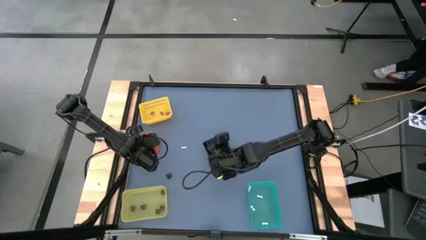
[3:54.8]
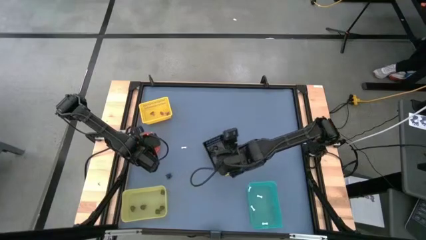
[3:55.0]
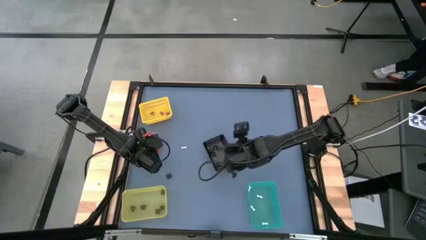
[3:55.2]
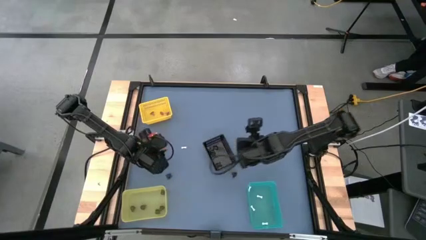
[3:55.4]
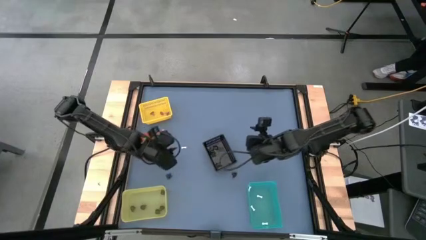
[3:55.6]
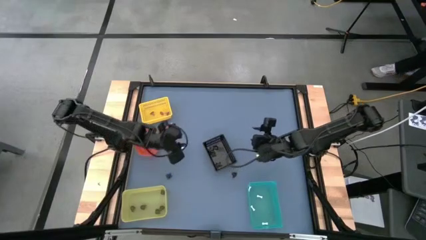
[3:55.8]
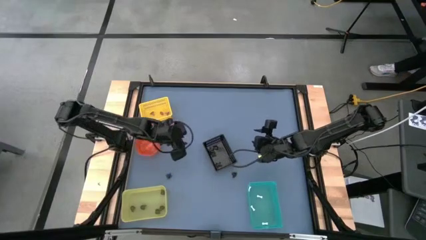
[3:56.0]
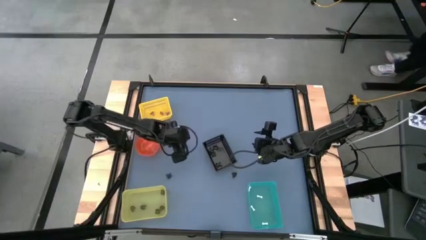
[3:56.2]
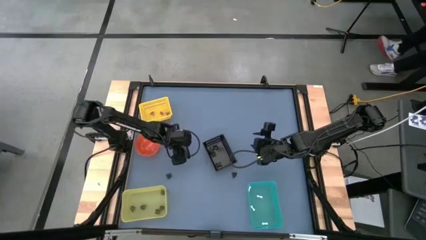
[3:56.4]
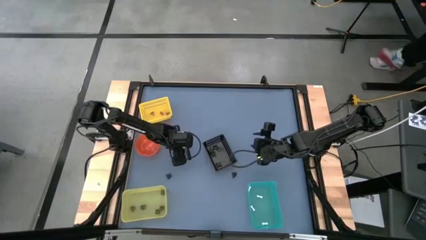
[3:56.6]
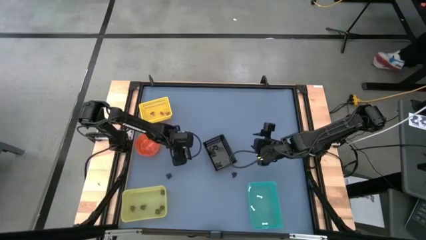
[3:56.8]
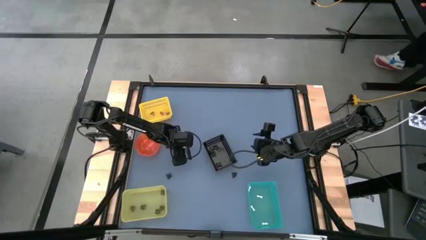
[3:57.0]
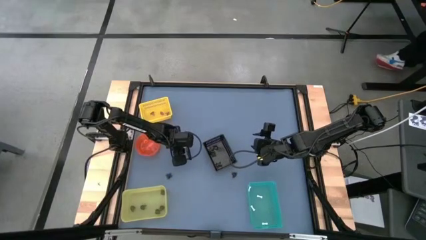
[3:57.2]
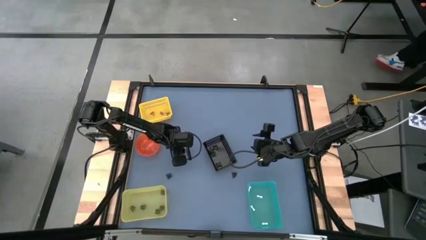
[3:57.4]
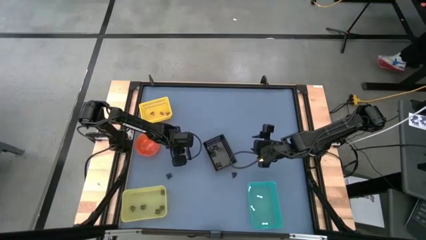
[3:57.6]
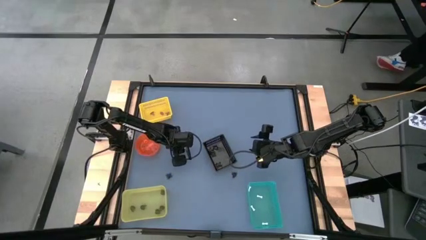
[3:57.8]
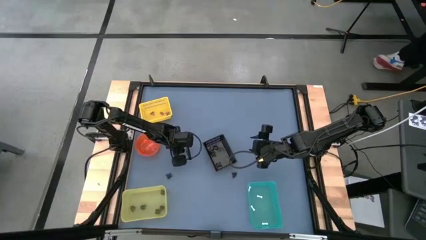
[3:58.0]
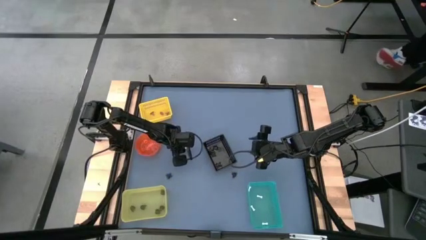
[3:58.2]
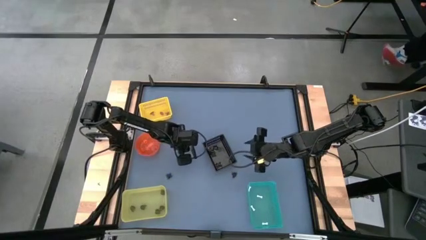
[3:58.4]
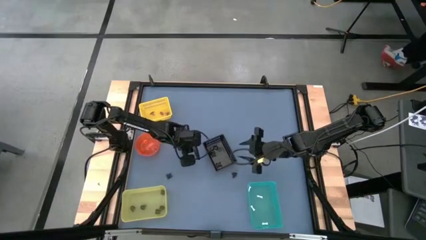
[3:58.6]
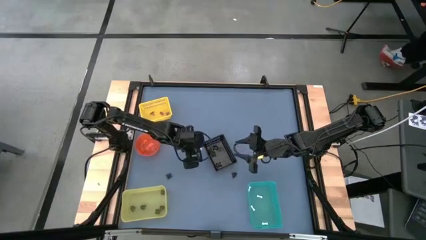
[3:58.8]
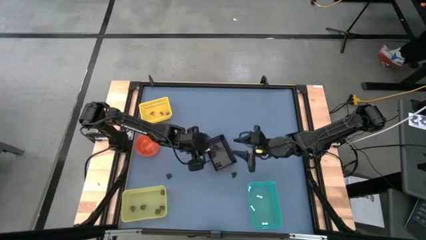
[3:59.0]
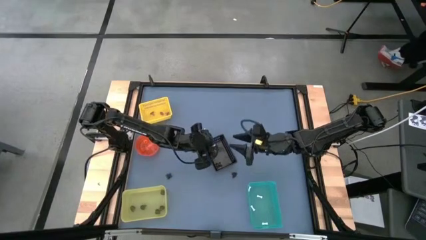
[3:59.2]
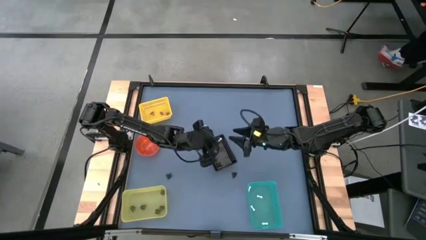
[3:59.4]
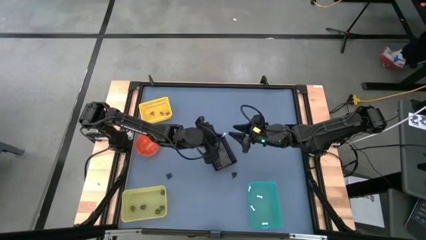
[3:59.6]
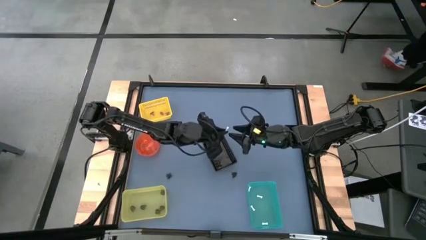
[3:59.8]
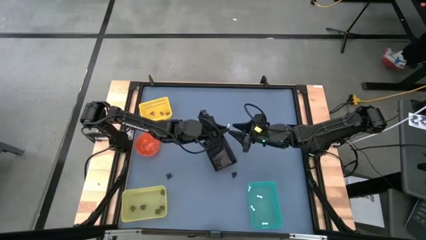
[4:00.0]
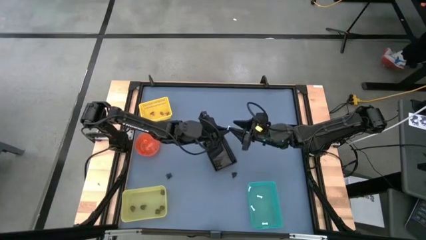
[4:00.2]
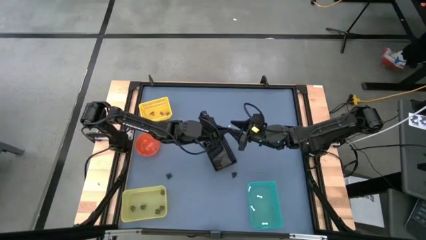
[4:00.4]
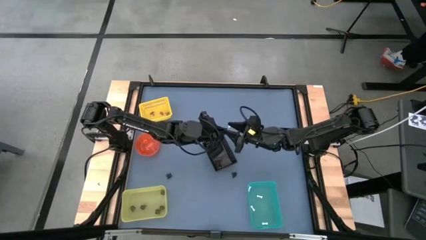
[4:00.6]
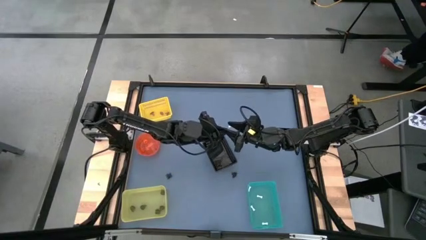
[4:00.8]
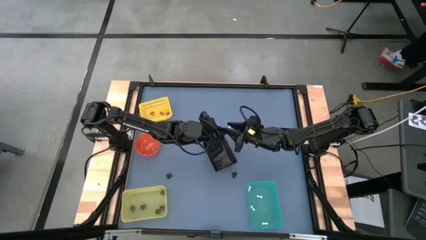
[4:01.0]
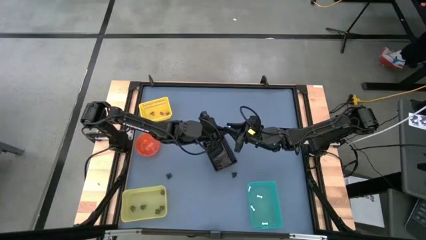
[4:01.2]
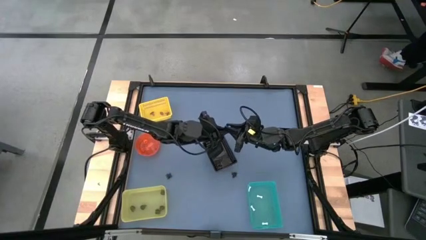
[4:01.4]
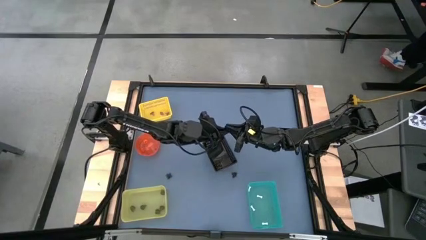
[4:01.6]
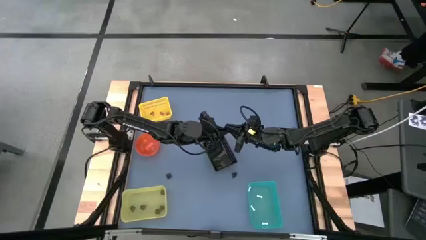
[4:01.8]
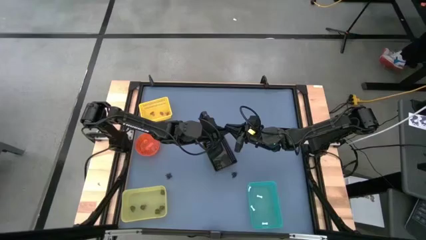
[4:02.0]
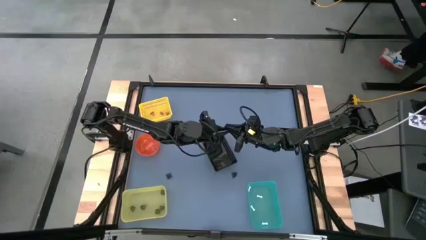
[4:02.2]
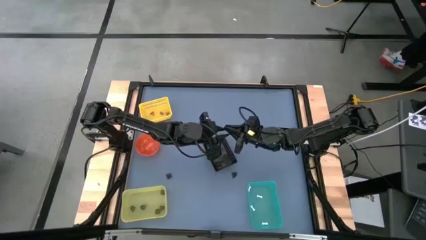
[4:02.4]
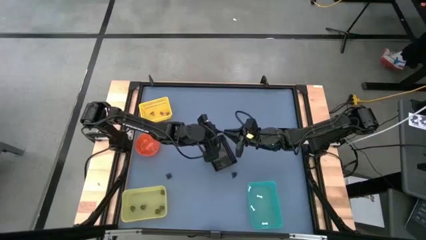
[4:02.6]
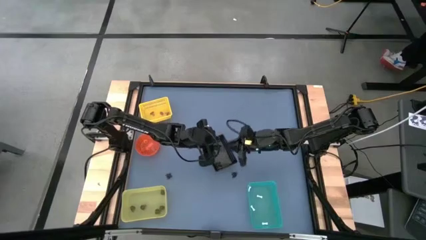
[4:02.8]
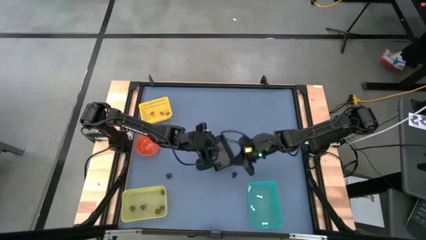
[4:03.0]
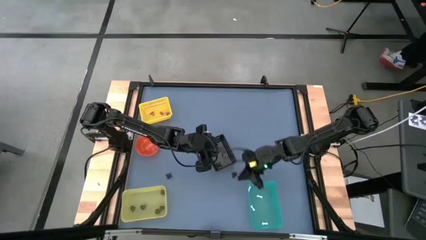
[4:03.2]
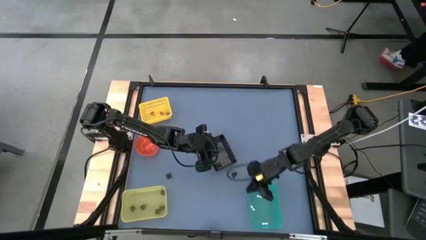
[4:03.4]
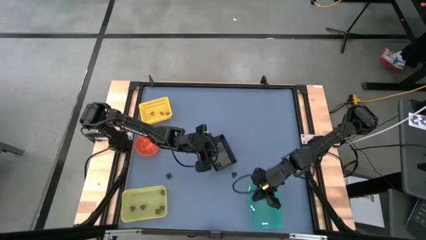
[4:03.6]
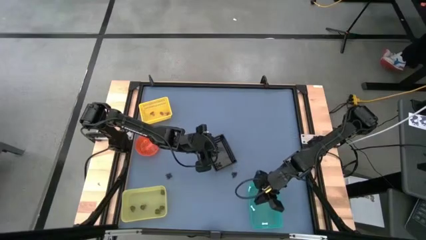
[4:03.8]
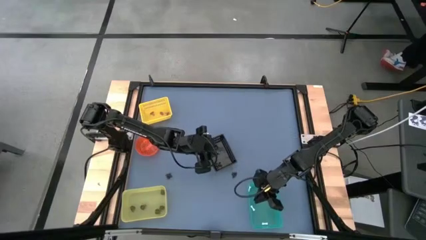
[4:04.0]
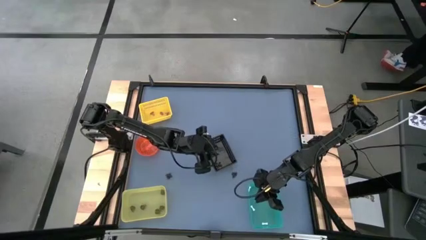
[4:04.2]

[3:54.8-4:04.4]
Task: Sort Halloween decoration
Put the white bone toy into the green bin

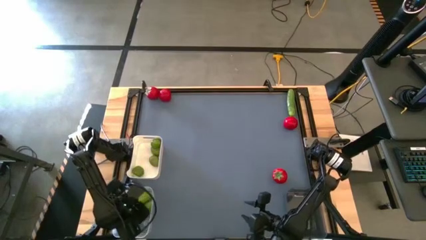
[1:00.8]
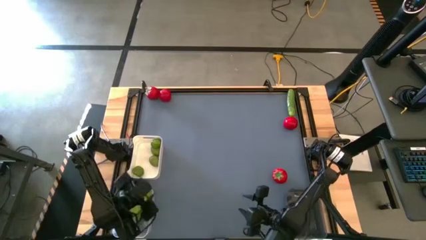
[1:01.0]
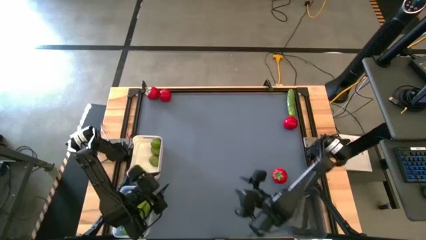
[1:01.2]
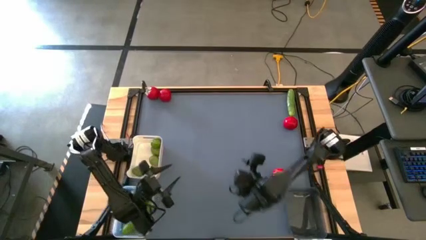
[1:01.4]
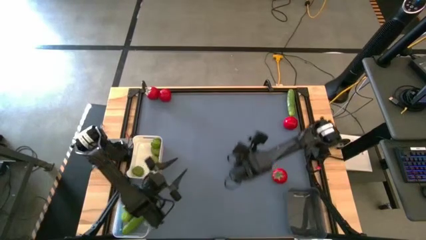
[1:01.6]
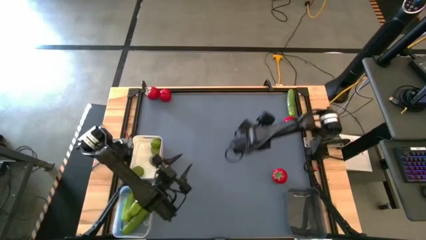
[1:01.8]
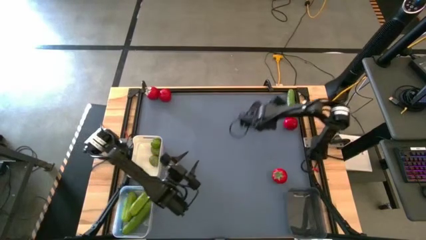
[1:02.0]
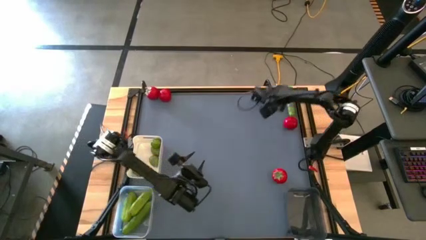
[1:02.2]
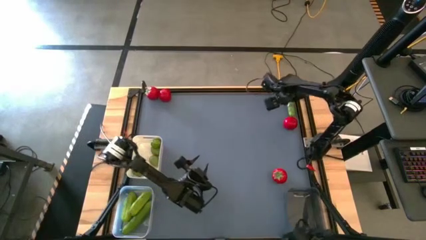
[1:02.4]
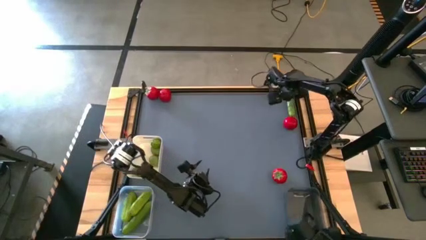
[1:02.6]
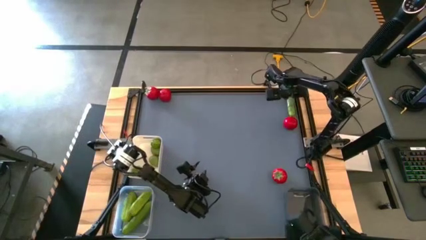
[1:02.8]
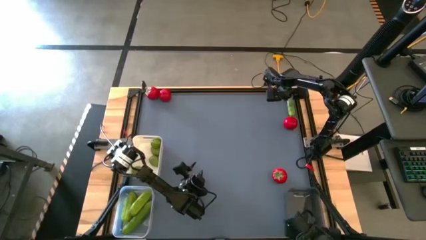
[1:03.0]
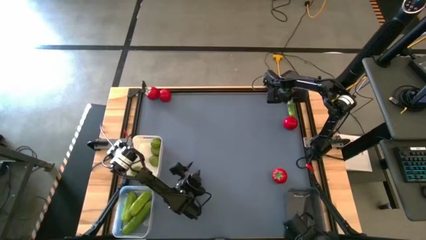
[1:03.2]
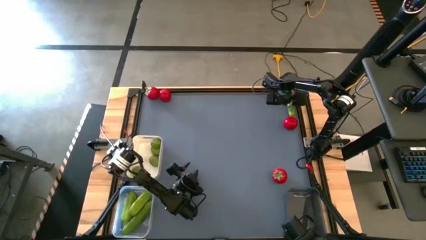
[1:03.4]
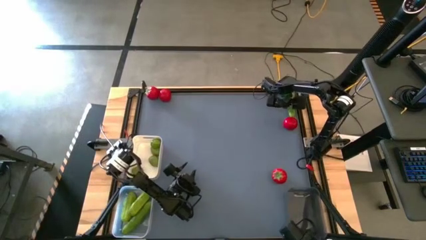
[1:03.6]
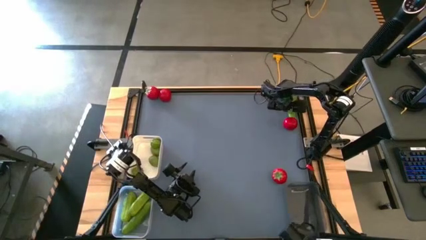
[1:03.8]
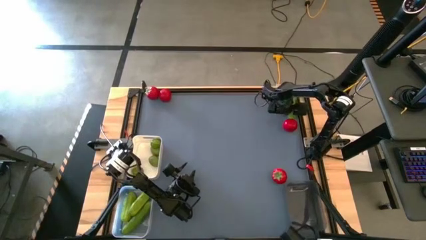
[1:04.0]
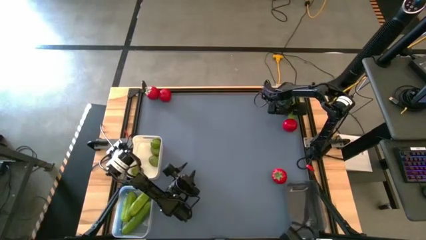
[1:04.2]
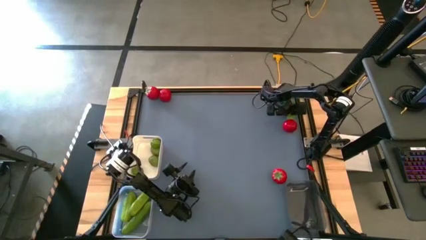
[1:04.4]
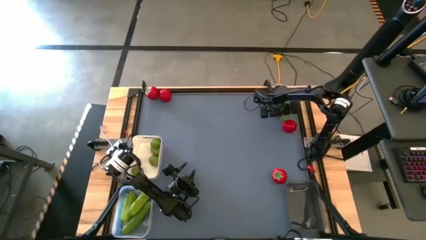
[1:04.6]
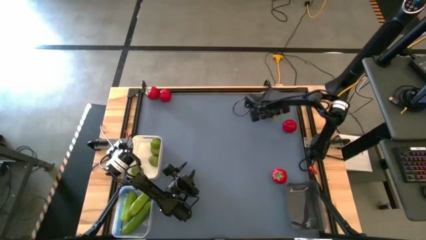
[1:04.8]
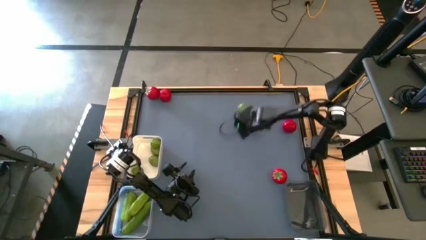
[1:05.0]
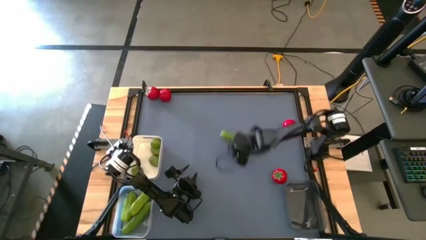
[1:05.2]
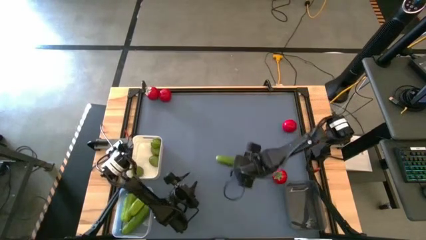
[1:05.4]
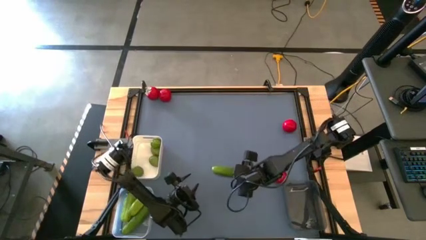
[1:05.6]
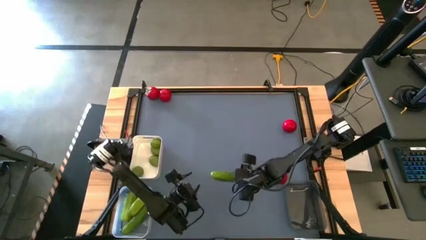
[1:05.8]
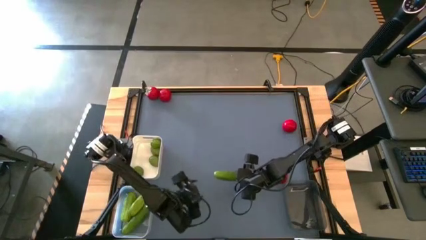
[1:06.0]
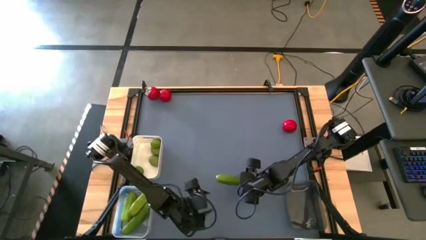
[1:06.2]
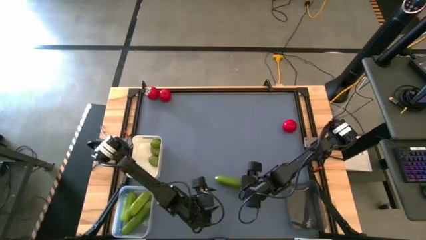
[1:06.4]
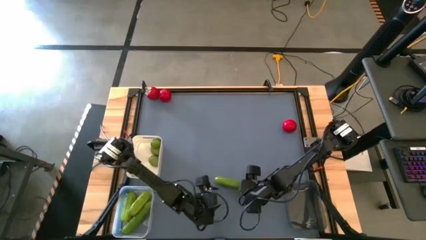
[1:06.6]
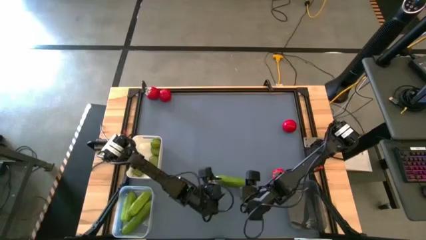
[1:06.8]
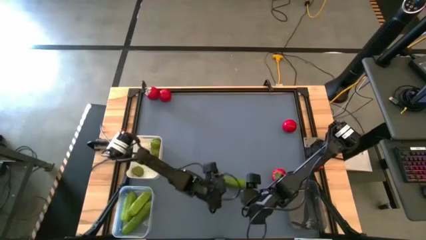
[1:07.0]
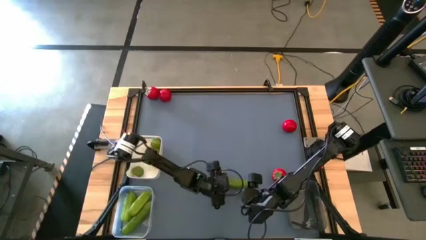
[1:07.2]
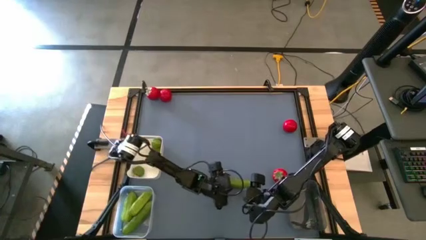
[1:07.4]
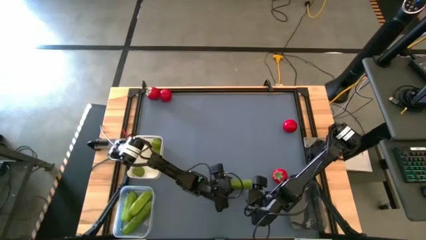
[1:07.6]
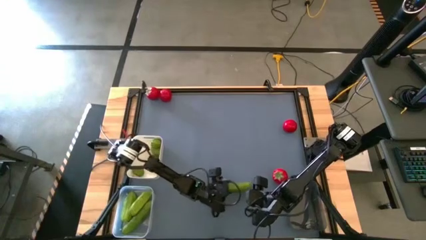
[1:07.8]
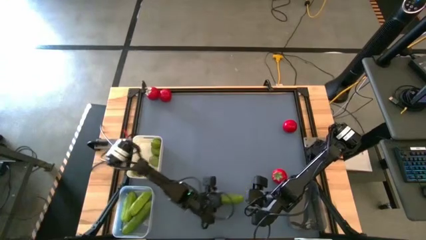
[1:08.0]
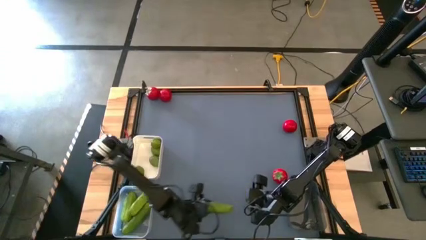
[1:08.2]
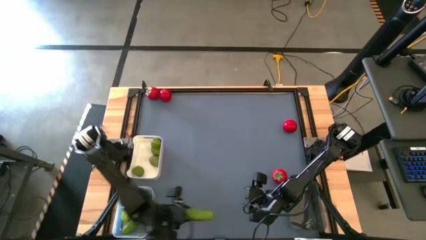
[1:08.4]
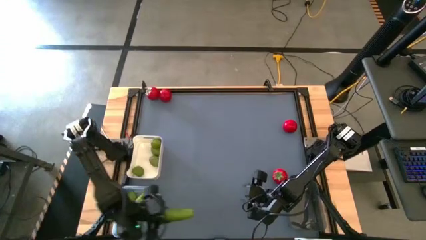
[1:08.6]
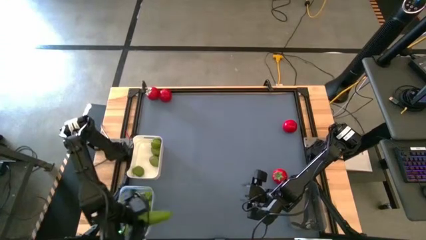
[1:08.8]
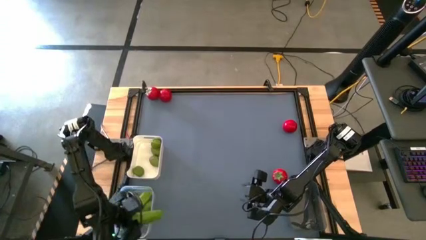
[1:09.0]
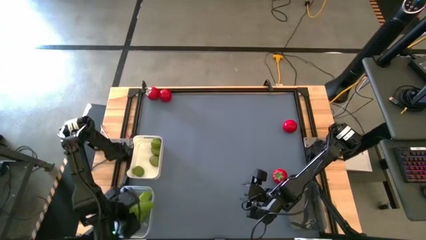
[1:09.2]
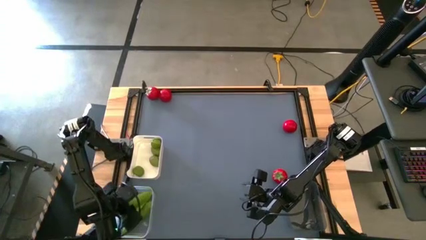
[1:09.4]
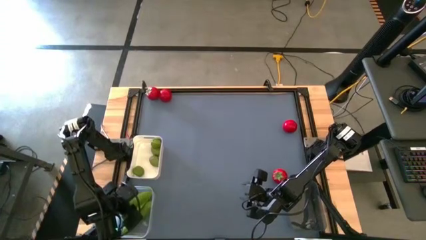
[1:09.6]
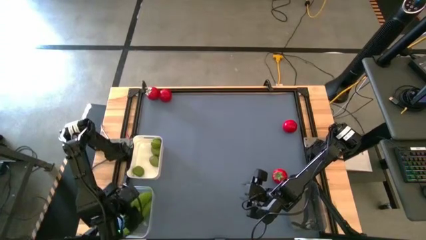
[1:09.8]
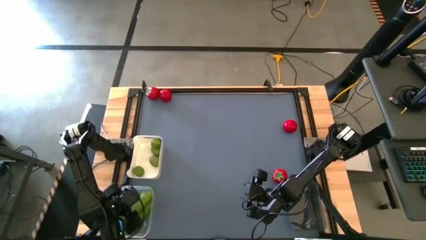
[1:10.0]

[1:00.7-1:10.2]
Task: Sort produce into baskets
Put the green cucumber into the transparent bin
